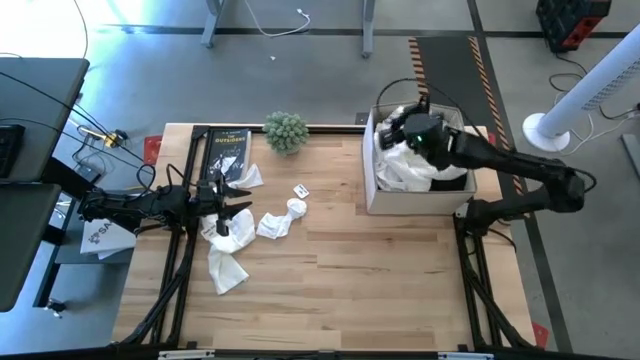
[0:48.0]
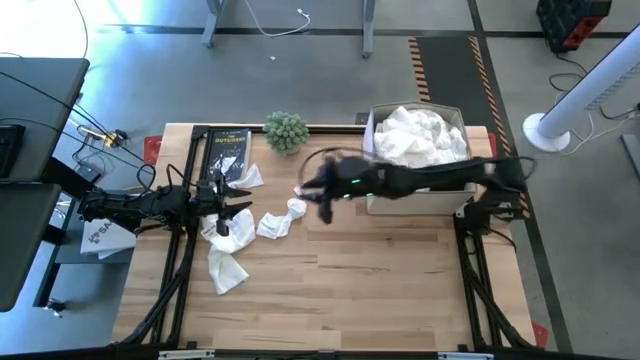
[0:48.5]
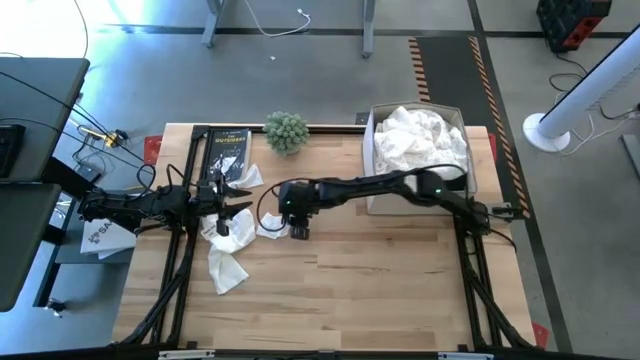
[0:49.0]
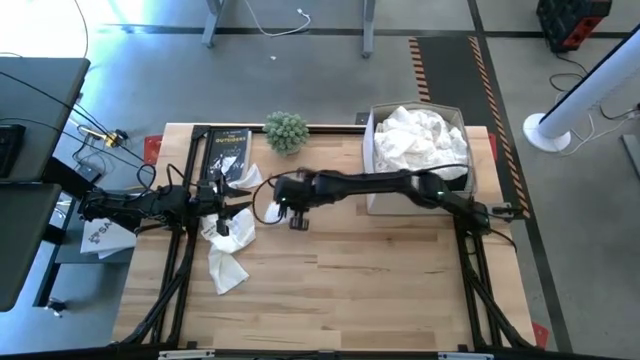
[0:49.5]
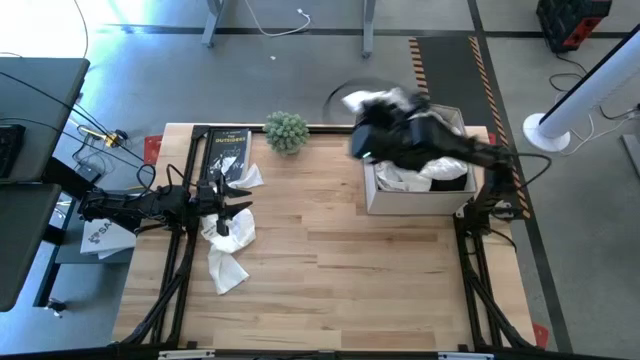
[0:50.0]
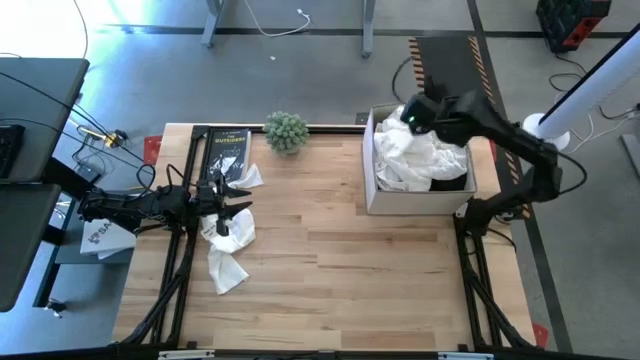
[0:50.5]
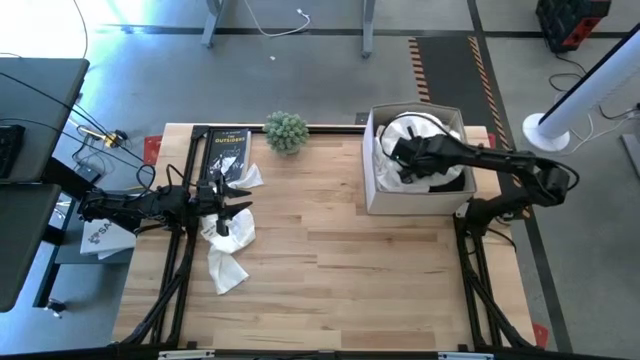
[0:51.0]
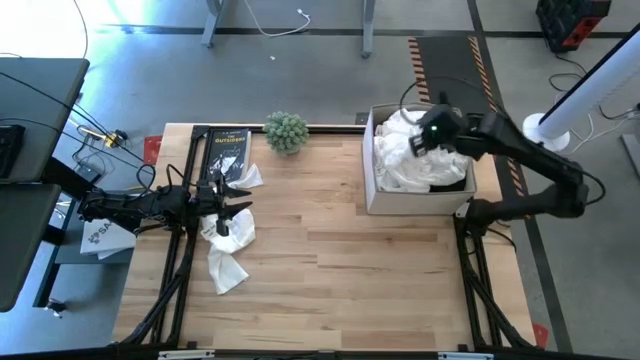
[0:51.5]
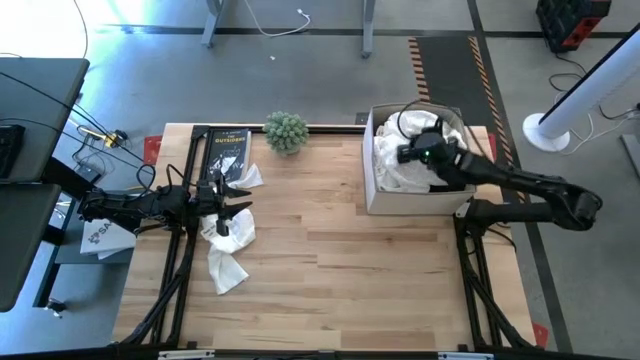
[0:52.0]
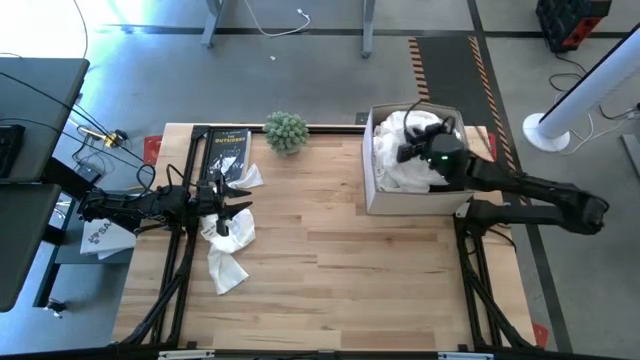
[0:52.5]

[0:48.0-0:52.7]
Task: Sort clothes
Put the right white sock into the white laundry bin

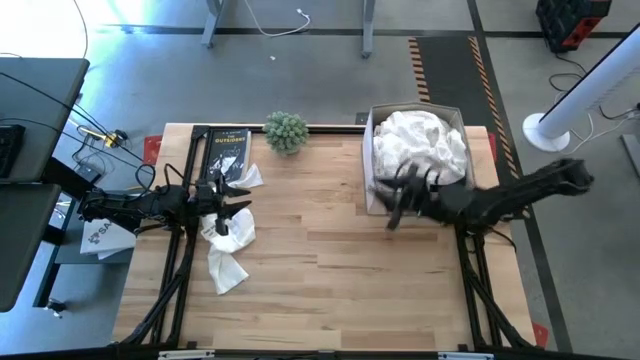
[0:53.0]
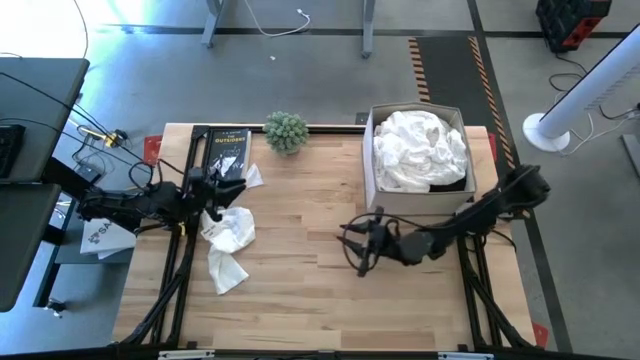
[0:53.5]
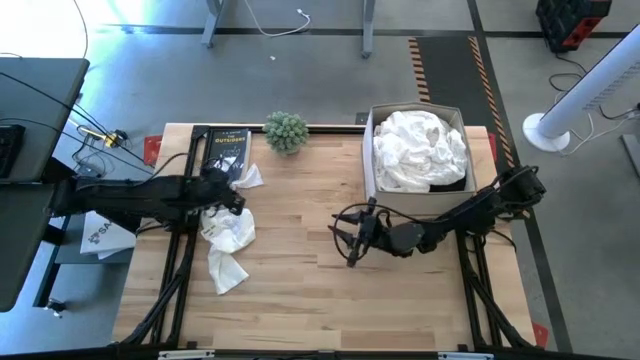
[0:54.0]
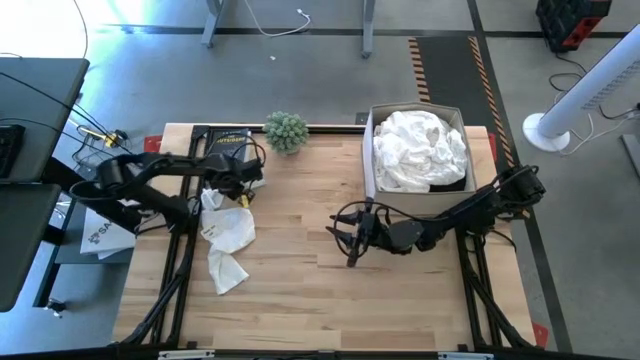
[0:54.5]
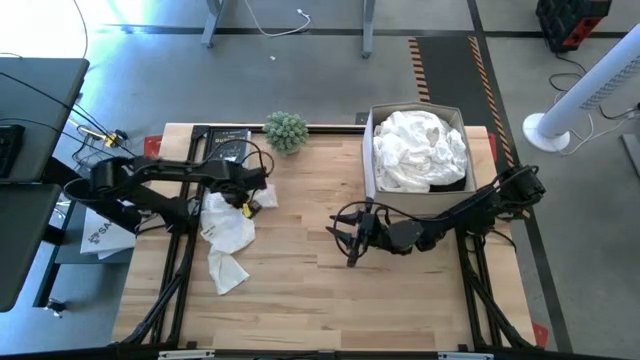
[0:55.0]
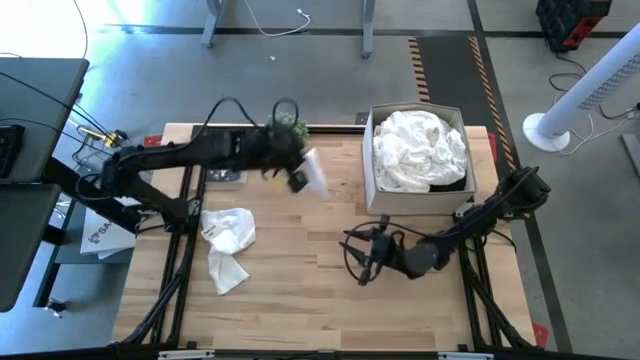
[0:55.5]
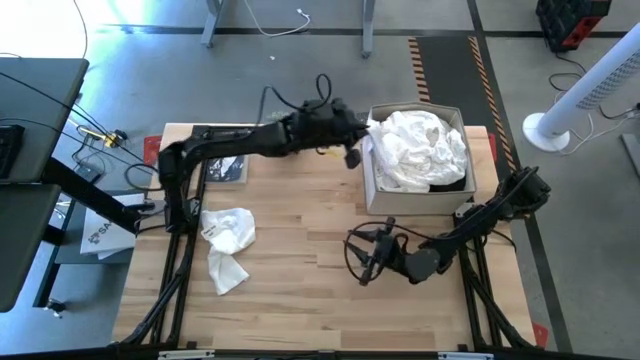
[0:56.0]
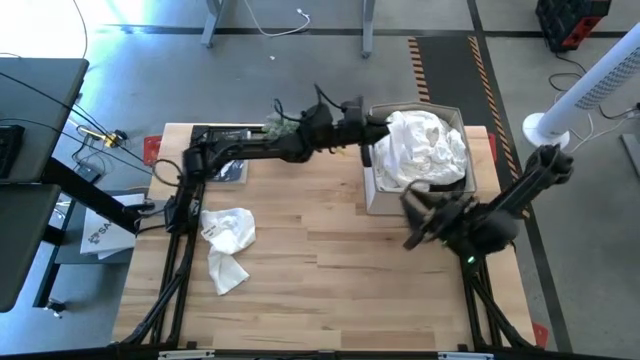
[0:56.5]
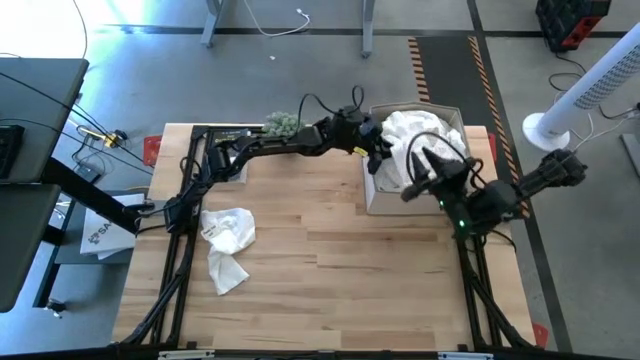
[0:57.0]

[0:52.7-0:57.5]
Put the white sock into the white laundry bin

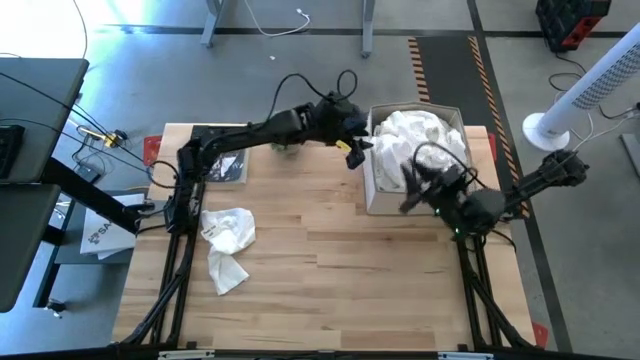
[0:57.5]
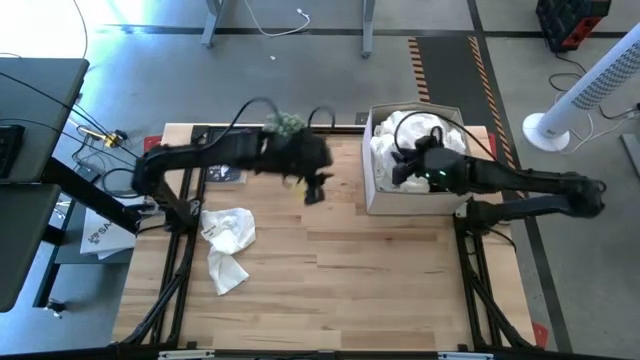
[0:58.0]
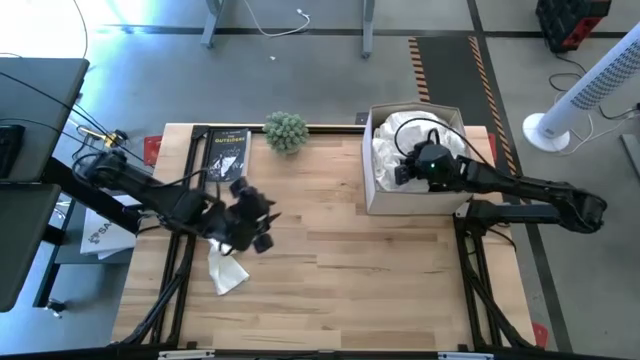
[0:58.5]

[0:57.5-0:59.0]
Adjust the white sock

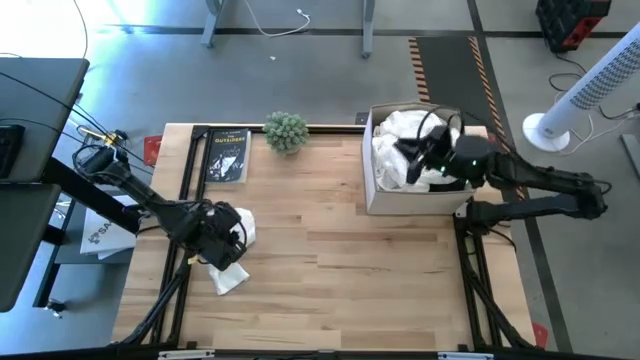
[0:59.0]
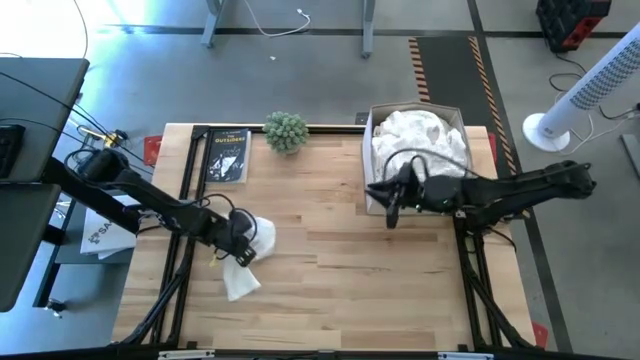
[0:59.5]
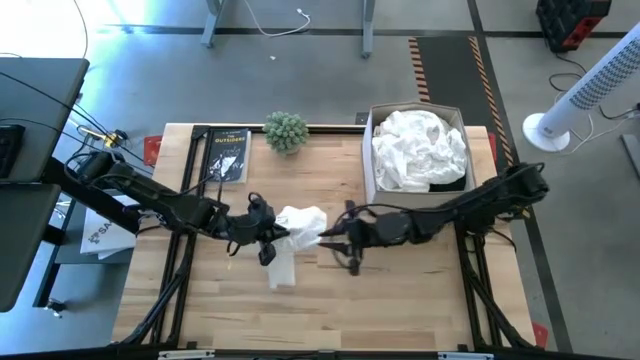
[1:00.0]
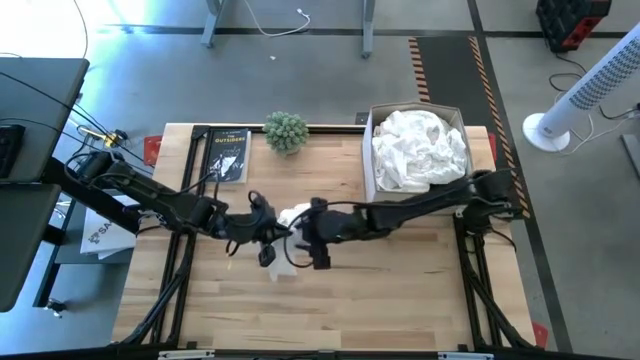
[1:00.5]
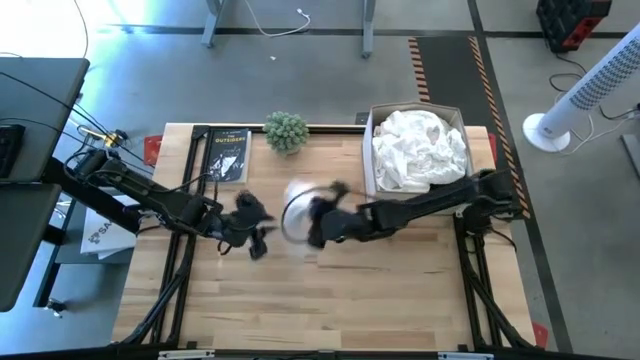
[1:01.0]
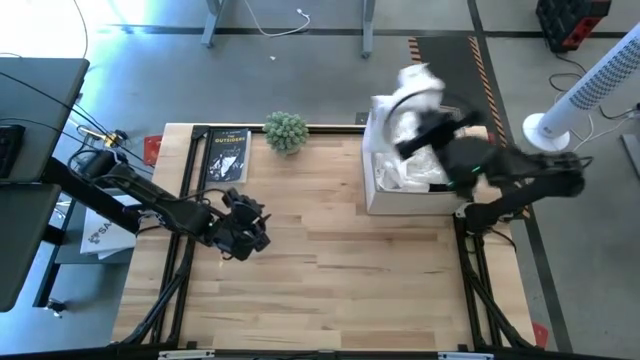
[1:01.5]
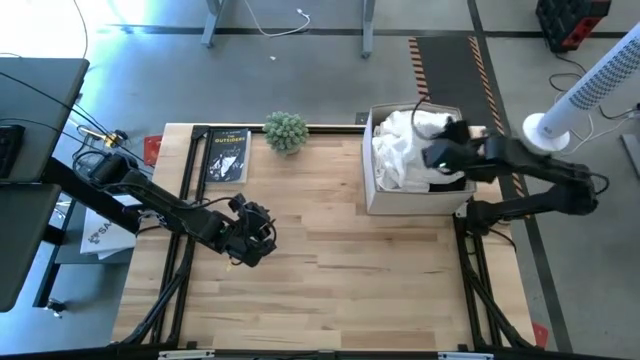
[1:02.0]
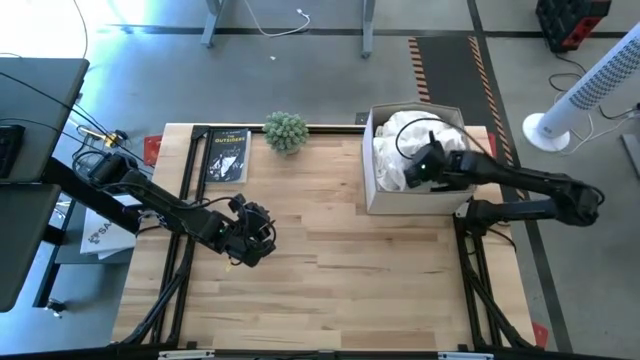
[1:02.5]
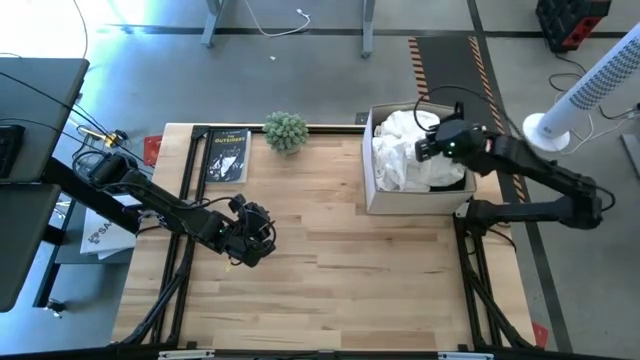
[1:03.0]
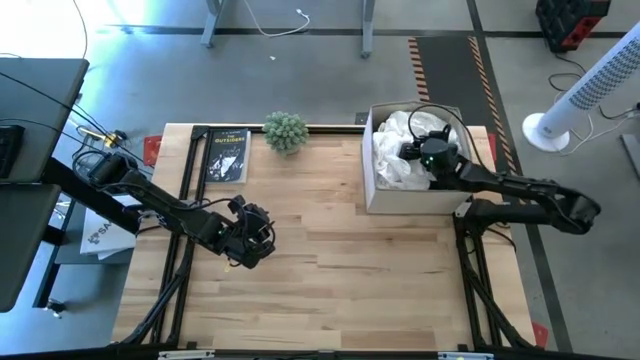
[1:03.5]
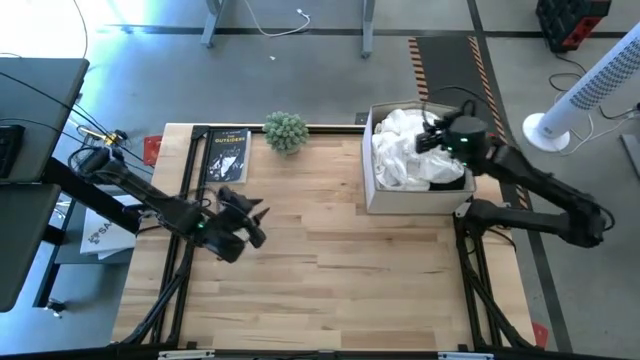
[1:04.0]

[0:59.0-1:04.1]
Put the white pants into the white laundry bin

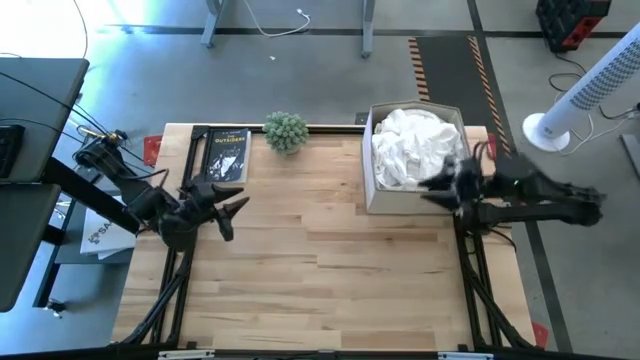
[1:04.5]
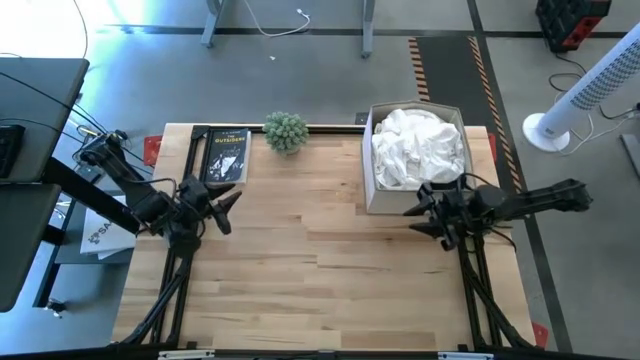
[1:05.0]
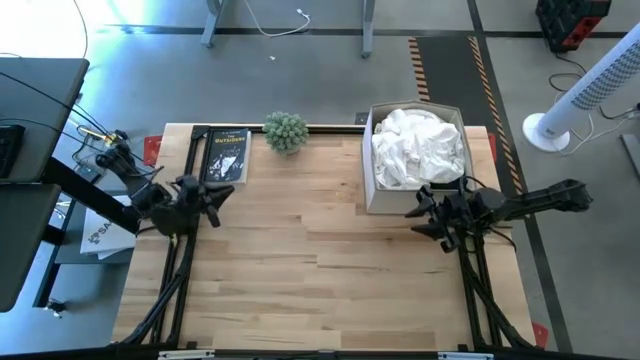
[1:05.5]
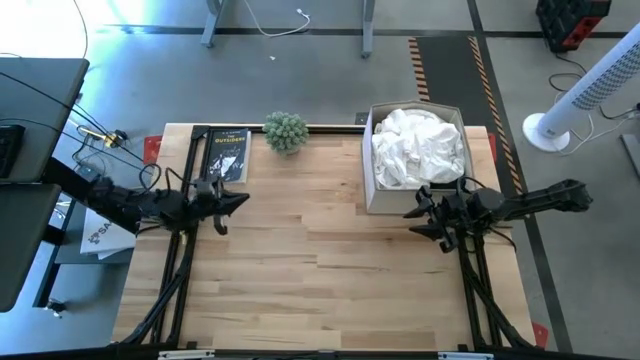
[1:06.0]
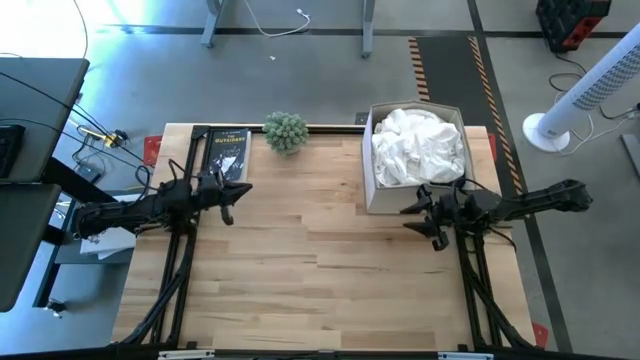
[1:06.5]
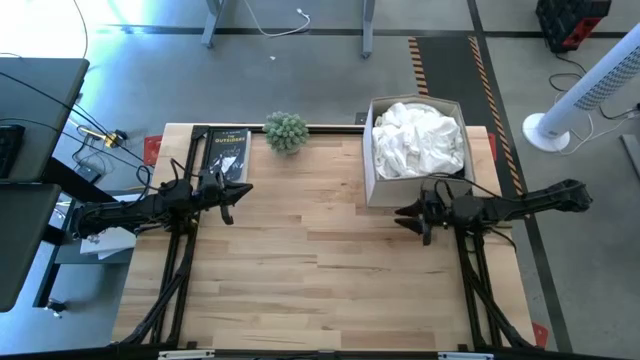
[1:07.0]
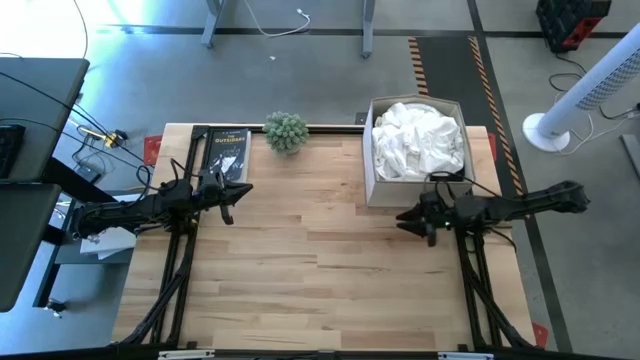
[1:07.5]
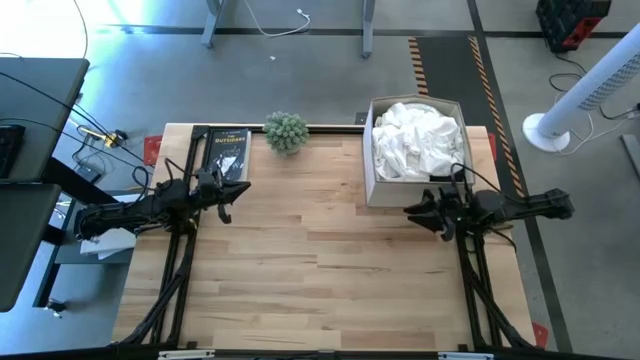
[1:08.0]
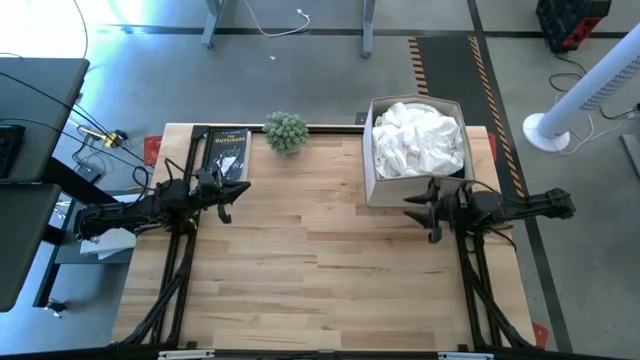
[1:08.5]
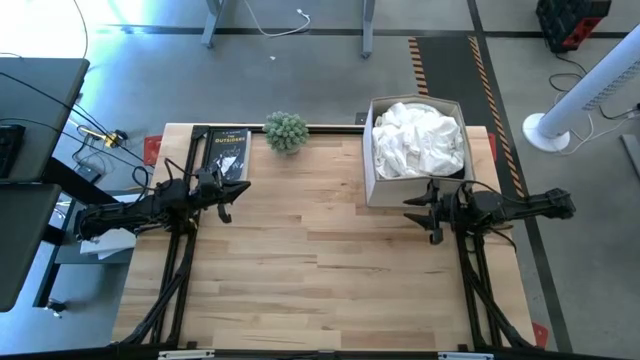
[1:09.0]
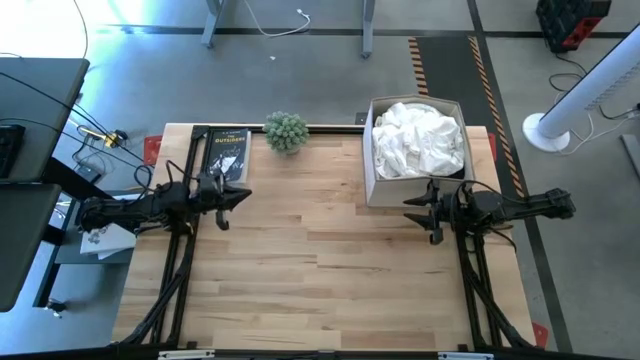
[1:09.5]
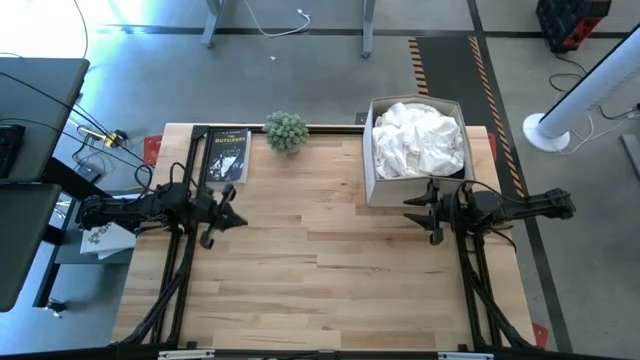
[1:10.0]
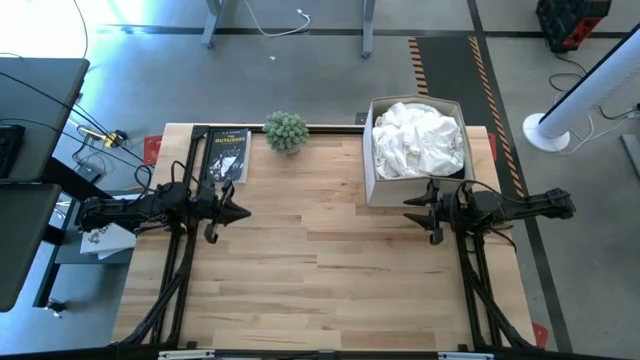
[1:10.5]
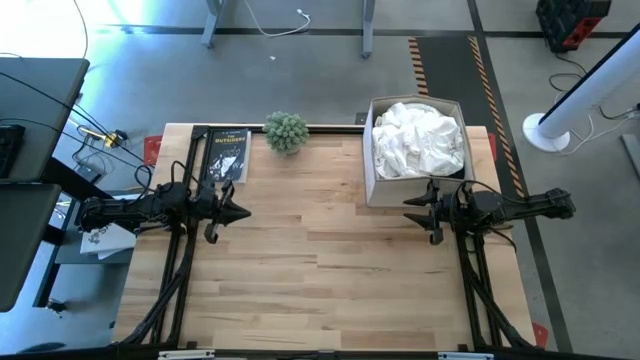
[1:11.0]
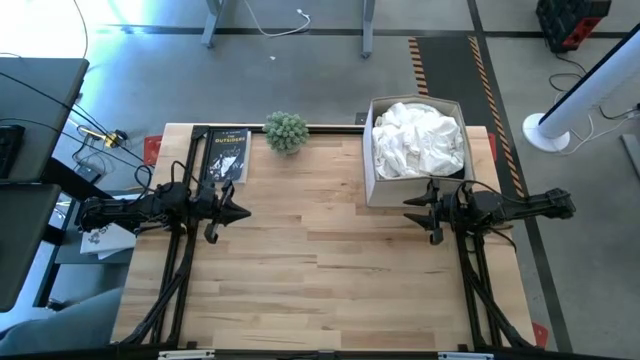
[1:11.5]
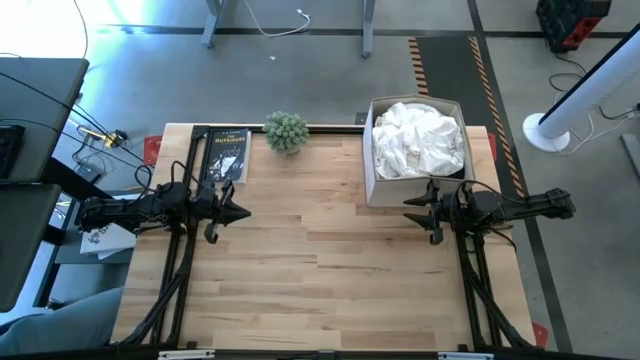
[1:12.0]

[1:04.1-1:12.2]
Return to Home Position
